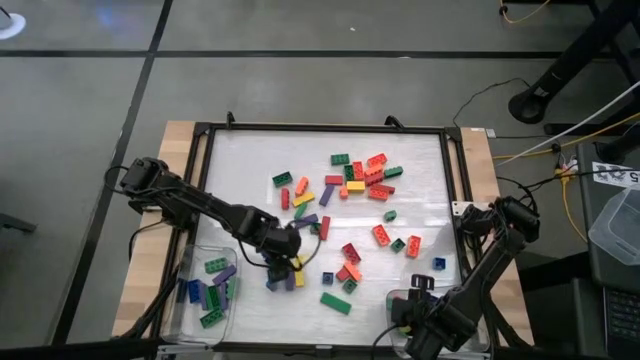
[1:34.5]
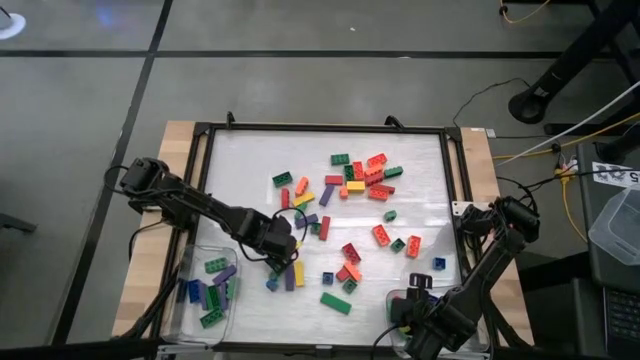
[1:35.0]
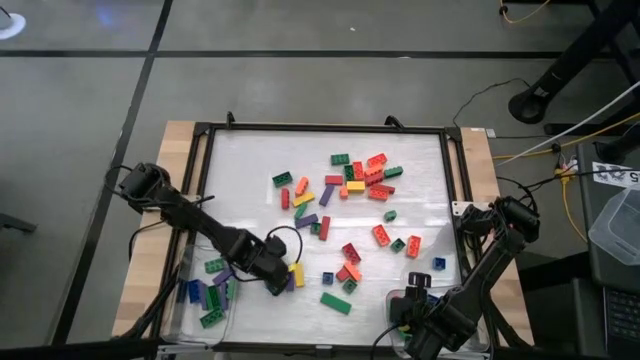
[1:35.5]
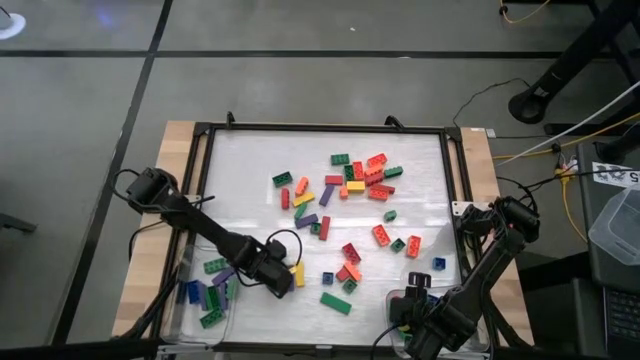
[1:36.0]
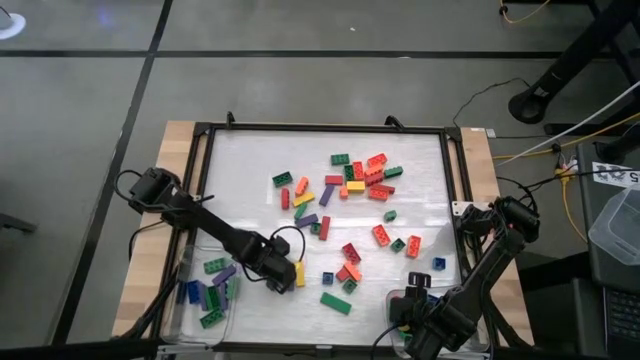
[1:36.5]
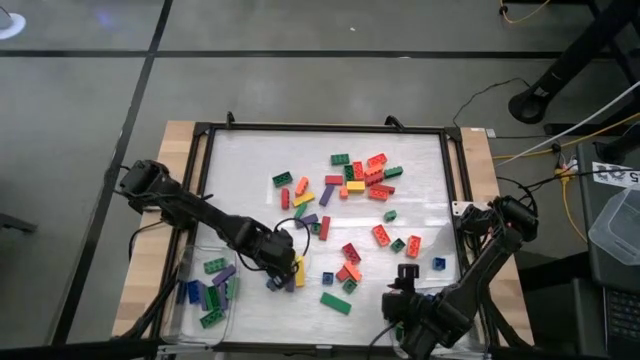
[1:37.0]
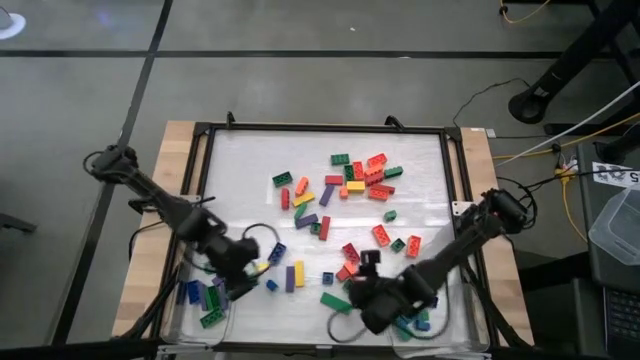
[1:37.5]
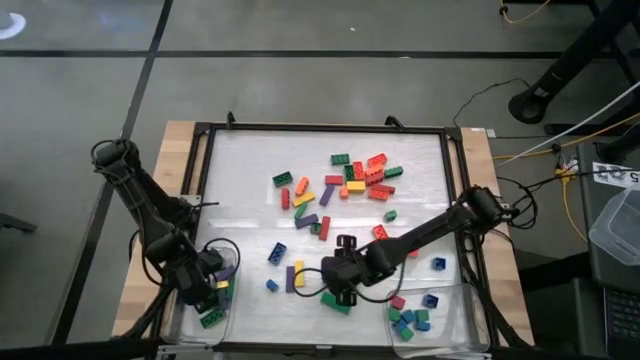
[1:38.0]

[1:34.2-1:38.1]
Task: Sort blocks by size
Put the large green game piece into the left transparent bin

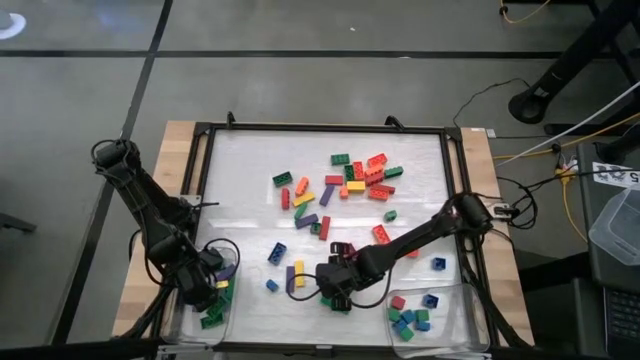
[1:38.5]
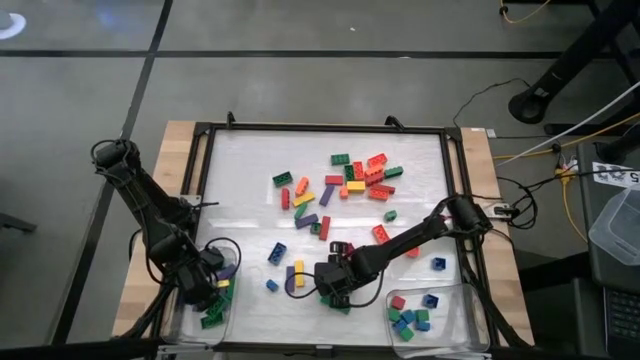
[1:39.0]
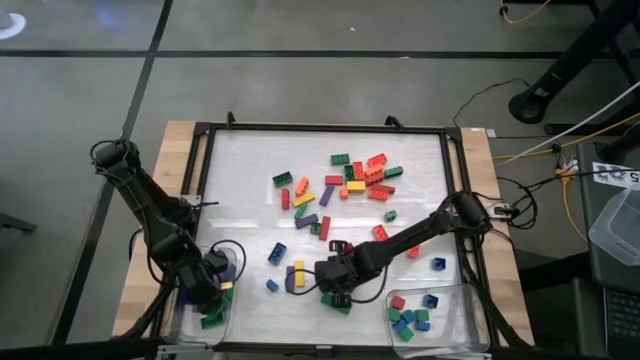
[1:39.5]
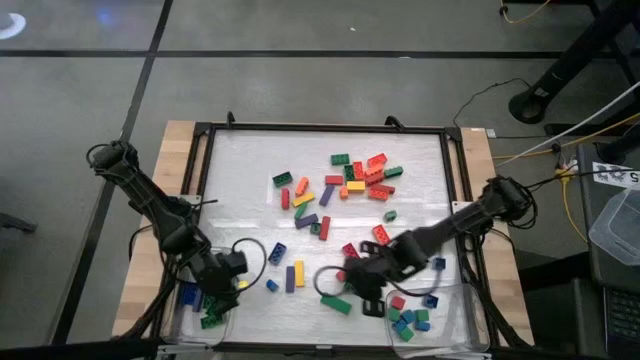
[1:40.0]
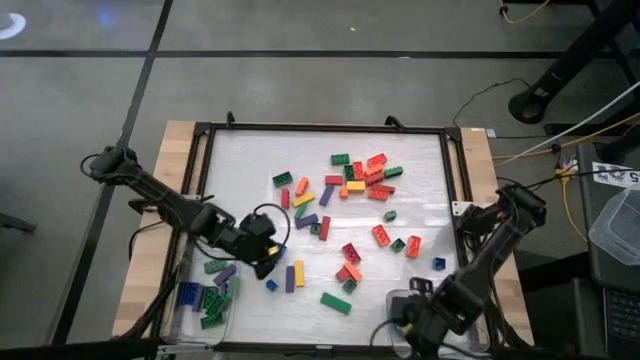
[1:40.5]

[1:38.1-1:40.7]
Put the small blue game piece into the right transparent bin

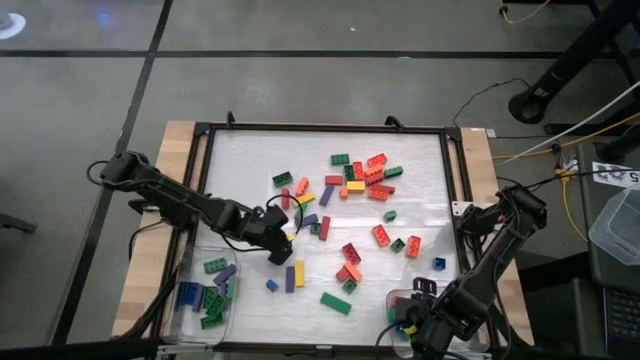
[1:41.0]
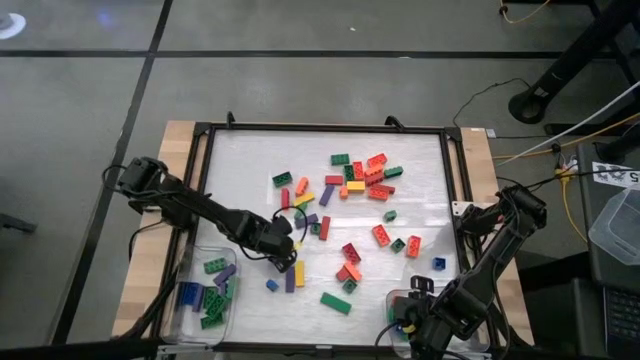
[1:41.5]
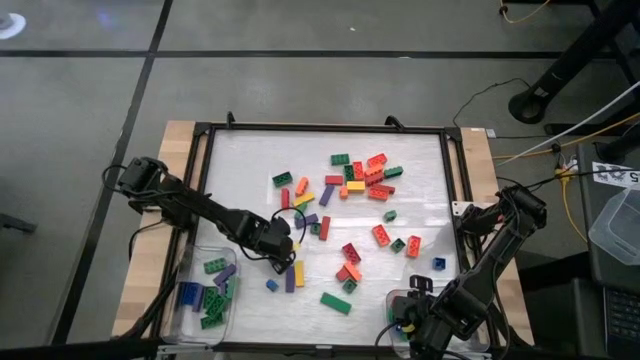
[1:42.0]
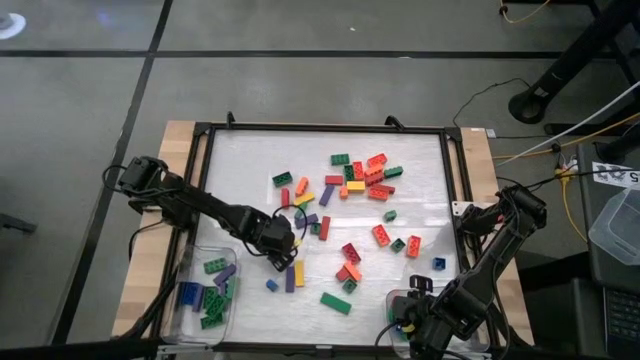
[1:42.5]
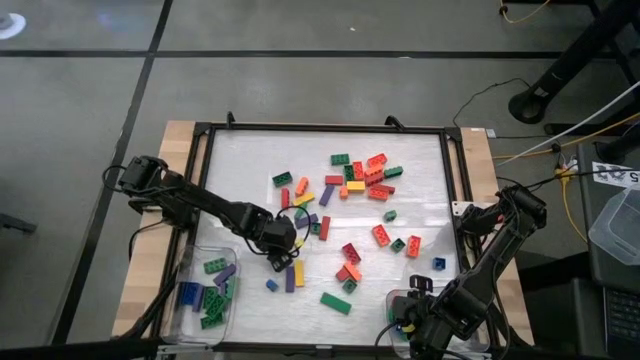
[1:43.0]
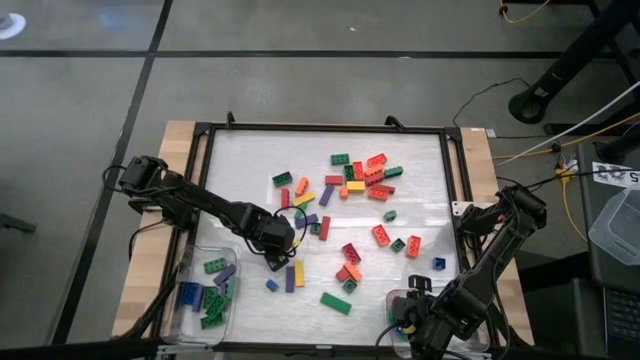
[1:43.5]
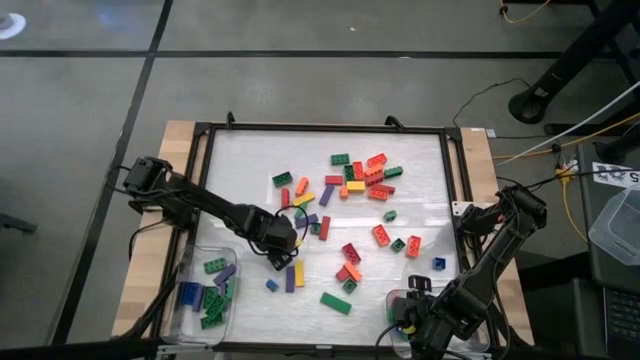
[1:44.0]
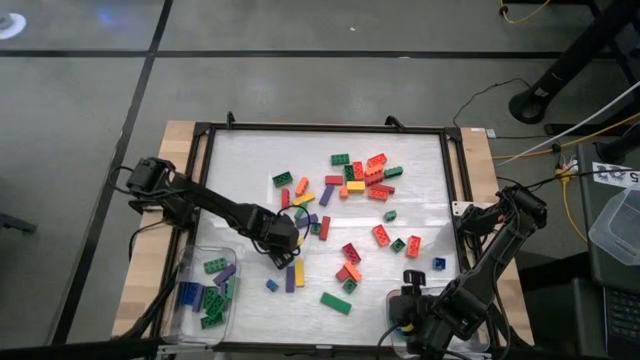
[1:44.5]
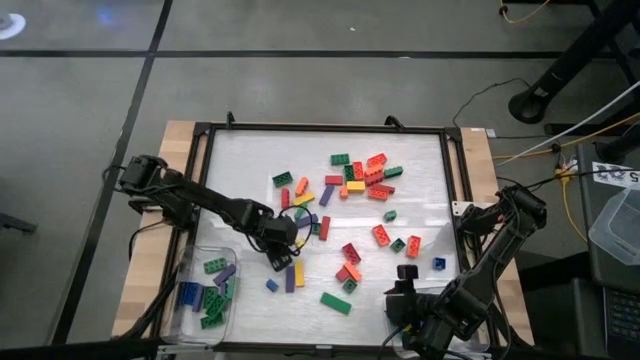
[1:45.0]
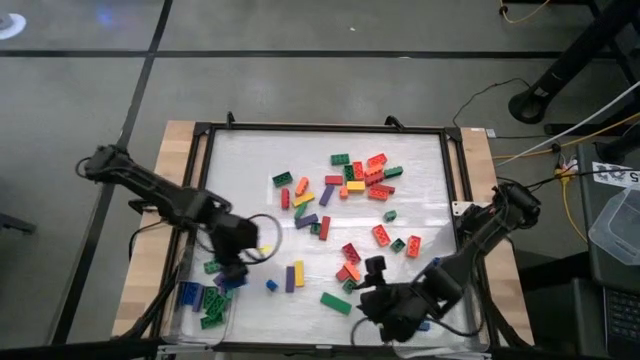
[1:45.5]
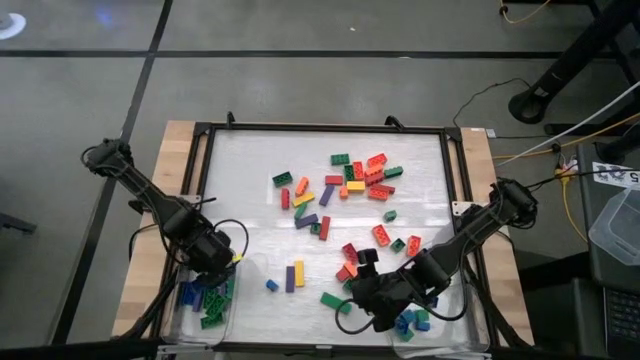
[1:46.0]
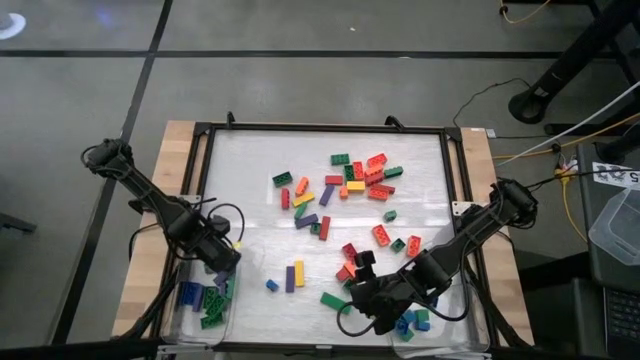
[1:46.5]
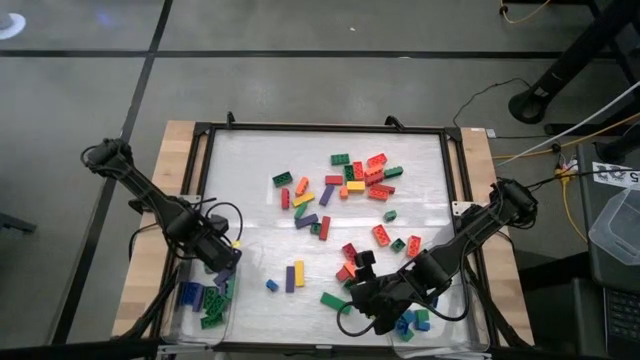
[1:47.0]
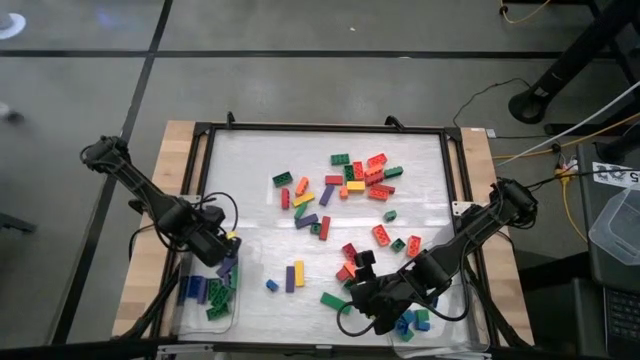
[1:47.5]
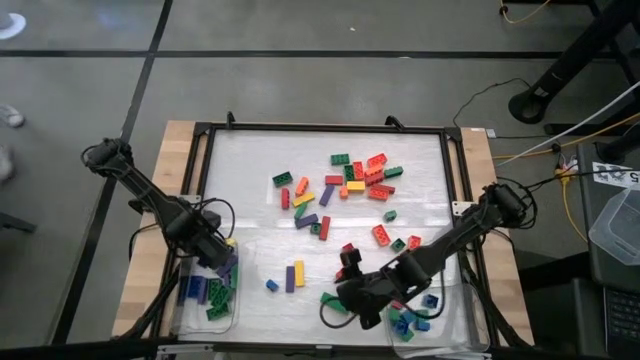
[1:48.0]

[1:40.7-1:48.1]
Put the large blue game piece into the left transparent bin

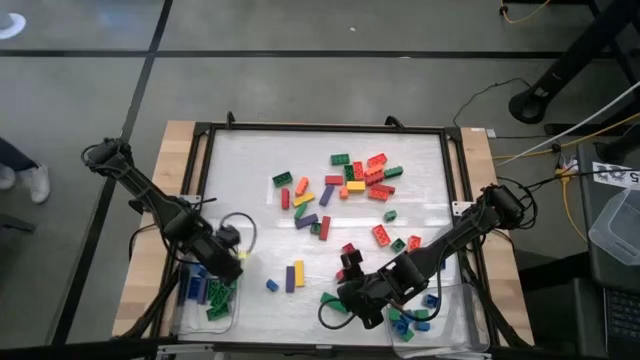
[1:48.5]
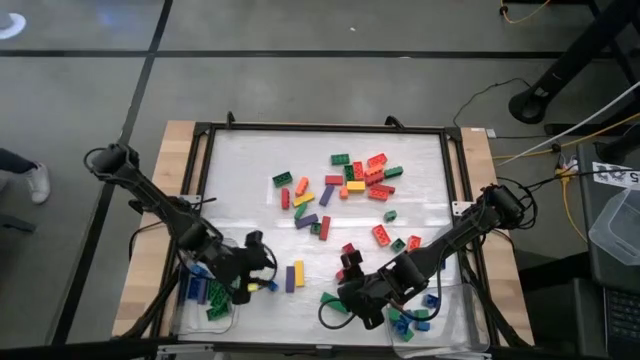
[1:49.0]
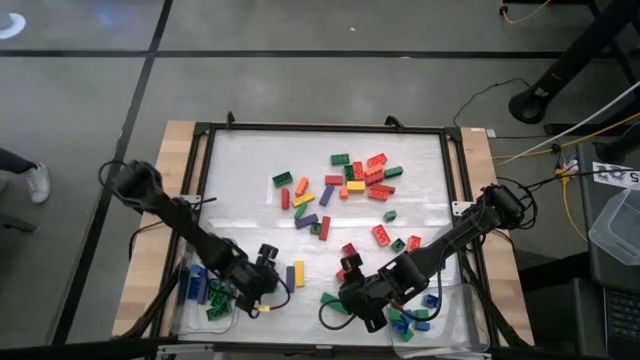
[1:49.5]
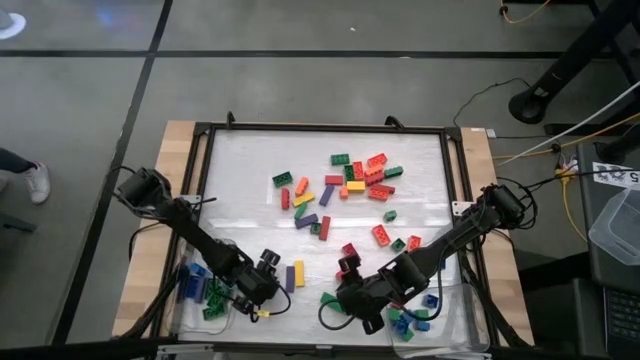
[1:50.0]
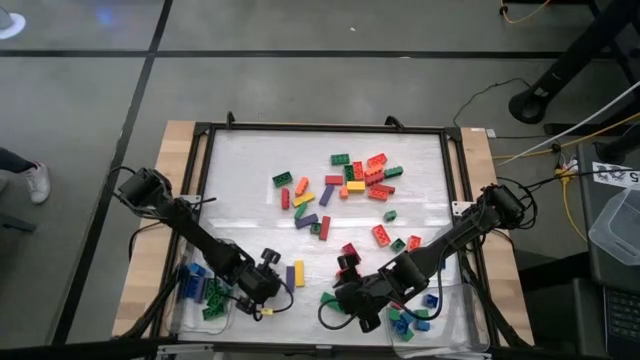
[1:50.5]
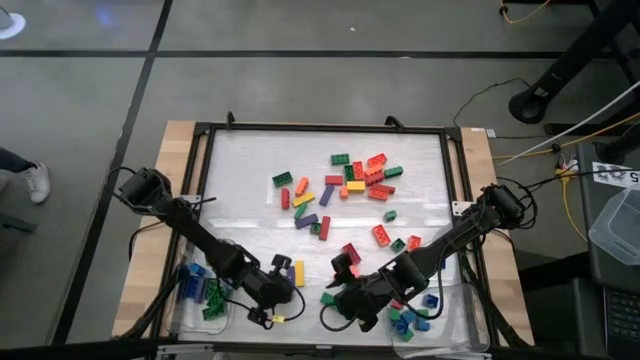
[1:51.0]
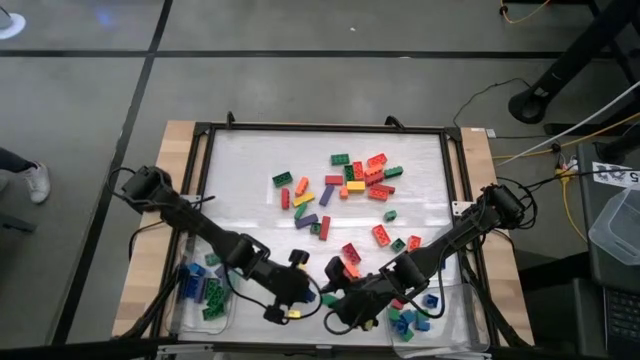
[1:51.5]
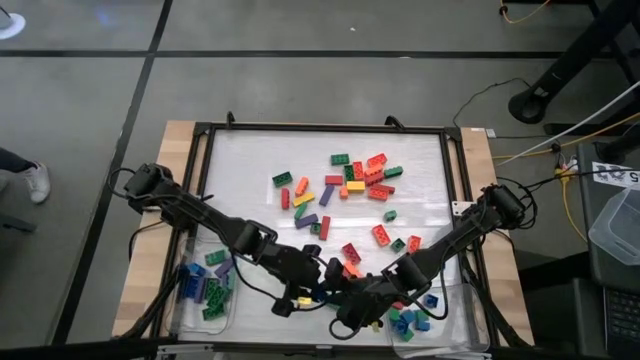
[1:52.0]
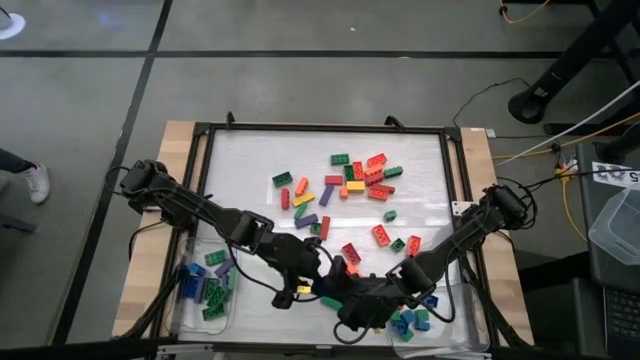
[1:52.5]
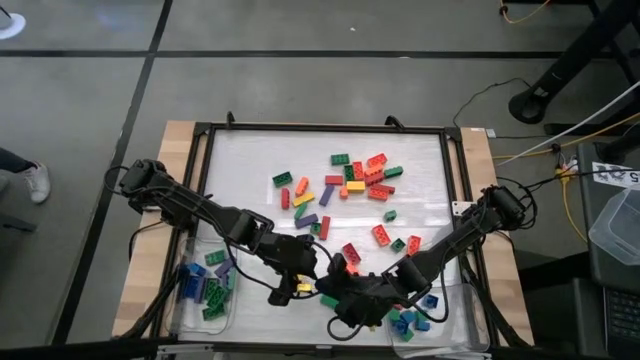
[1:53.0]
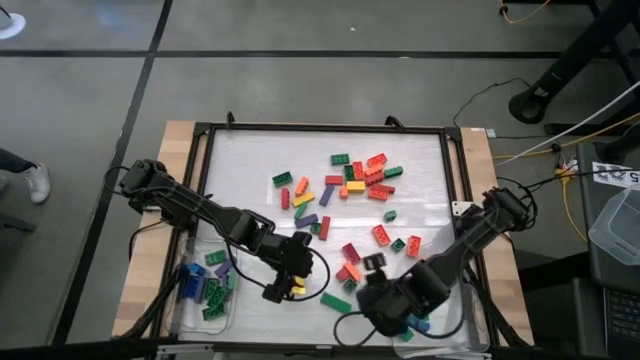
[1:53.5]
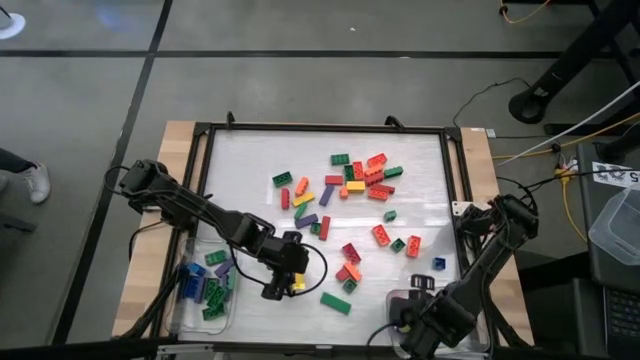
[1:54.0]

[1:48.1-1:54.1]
Put the small blue game piece into the right transparent bin

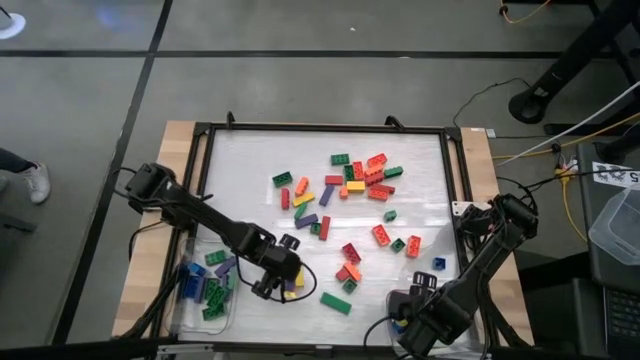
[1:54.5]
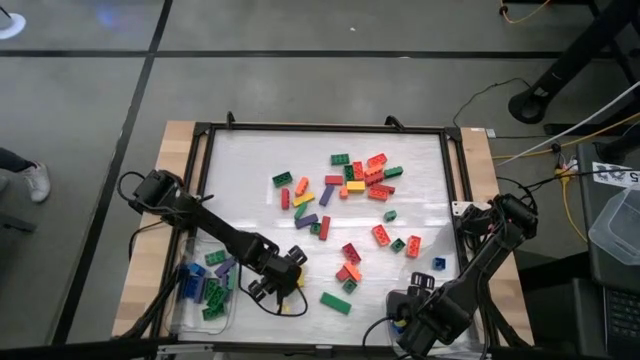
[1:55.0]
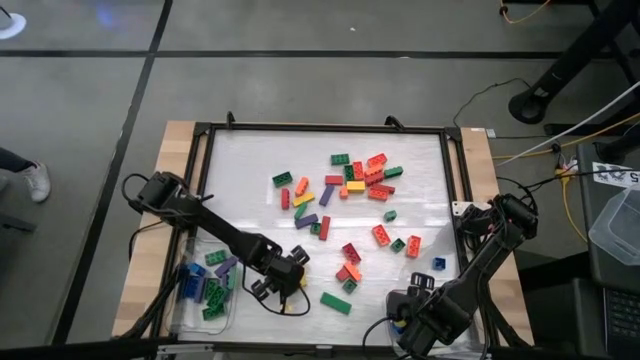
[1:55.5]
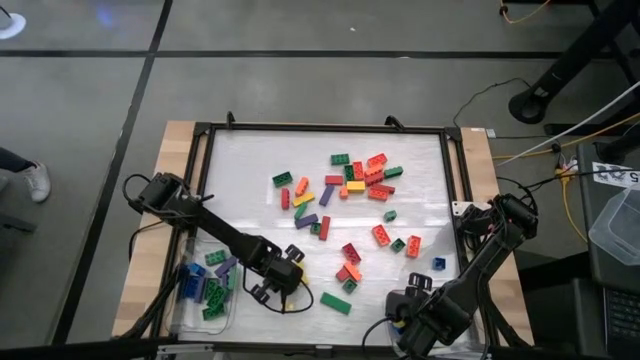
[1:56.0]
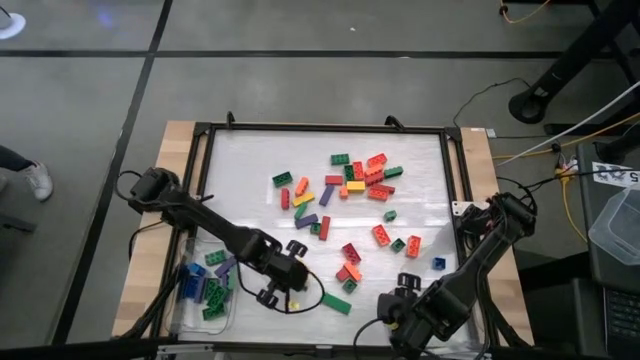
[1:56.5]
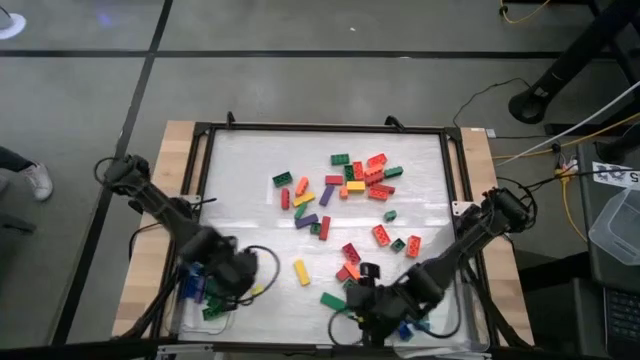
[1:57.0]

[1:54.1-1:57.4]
Put the large violet block into the left transparent bin
